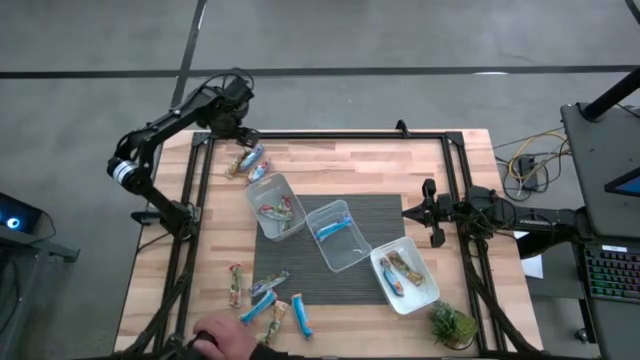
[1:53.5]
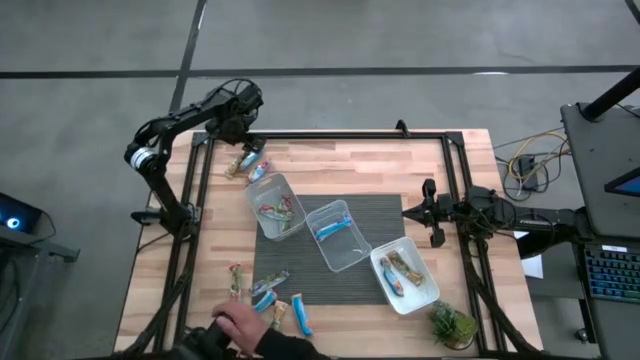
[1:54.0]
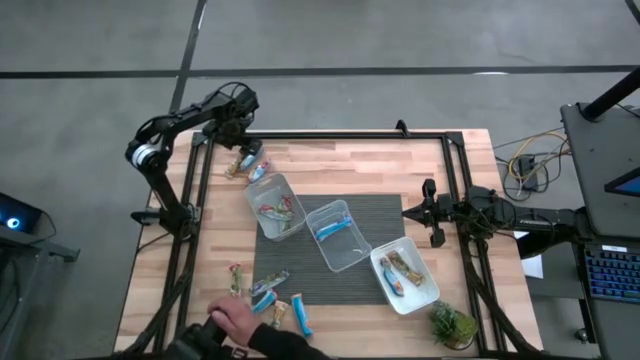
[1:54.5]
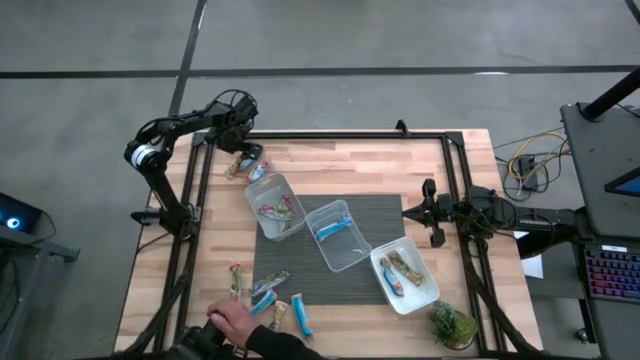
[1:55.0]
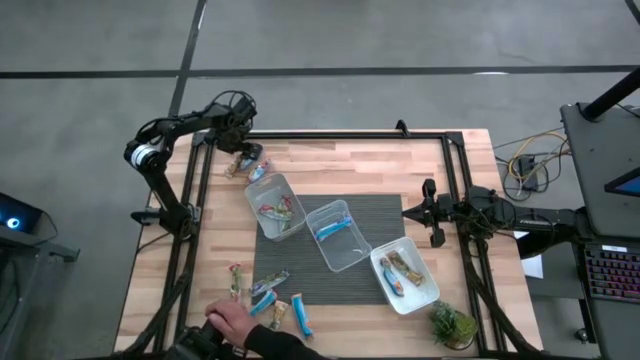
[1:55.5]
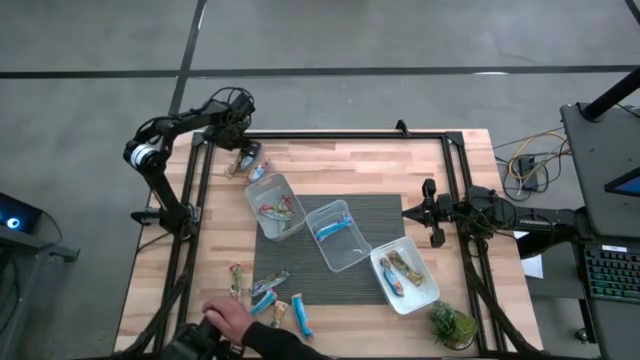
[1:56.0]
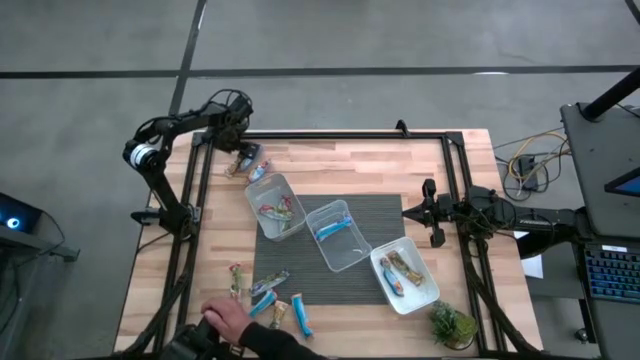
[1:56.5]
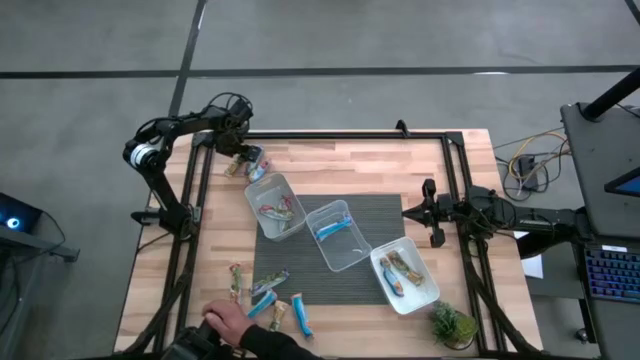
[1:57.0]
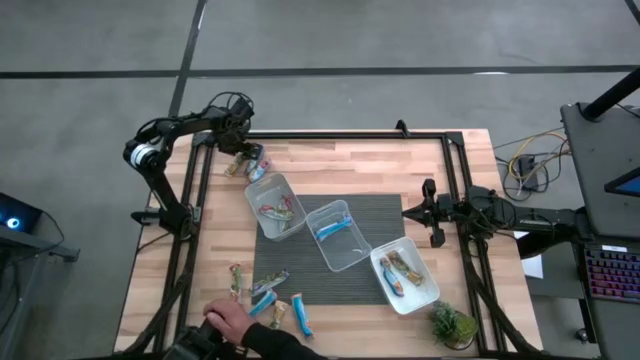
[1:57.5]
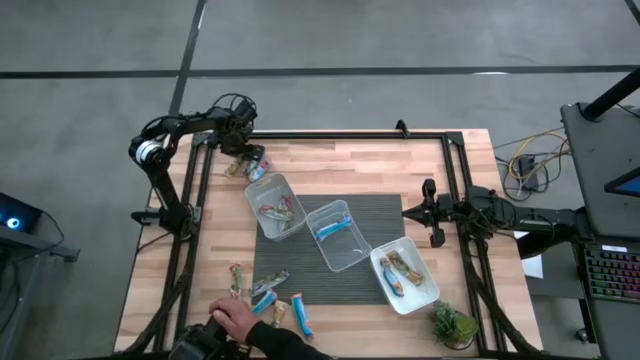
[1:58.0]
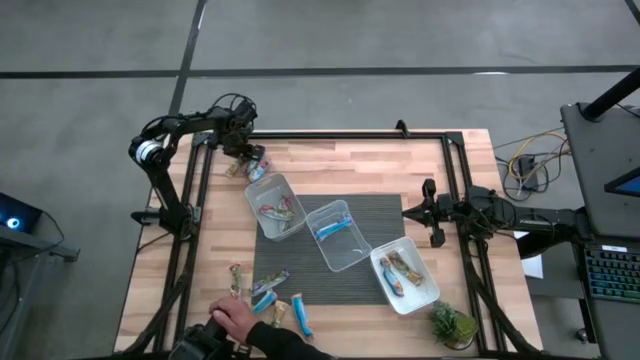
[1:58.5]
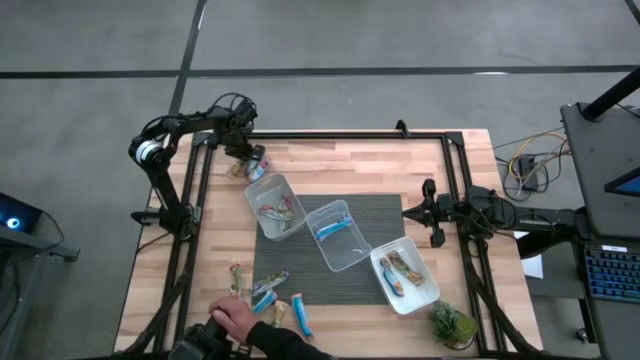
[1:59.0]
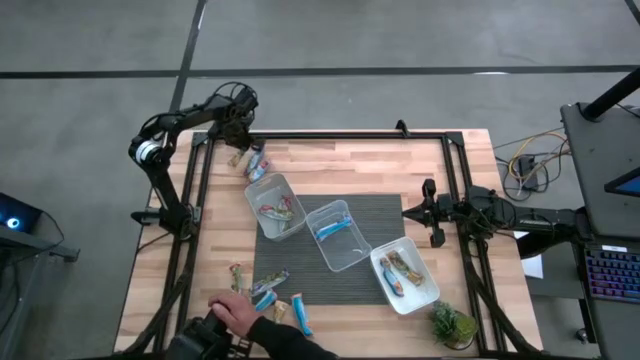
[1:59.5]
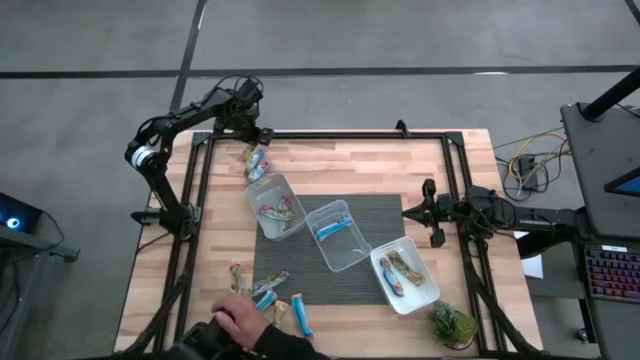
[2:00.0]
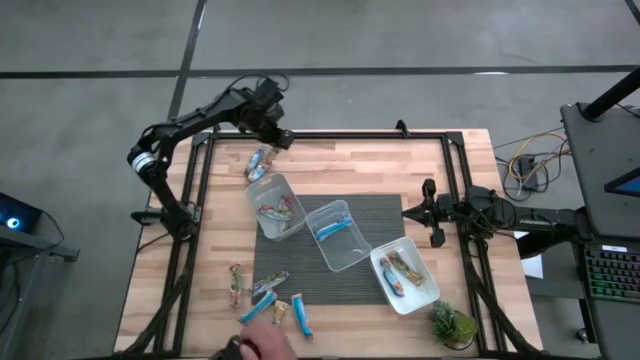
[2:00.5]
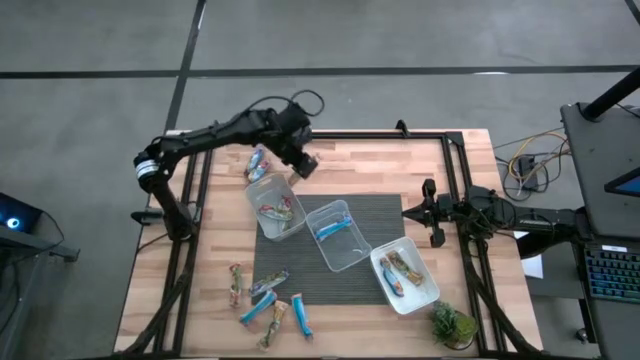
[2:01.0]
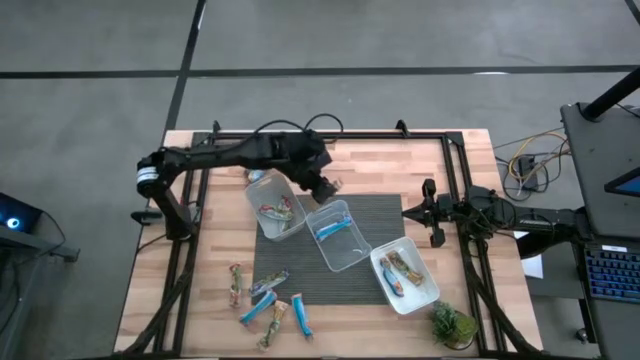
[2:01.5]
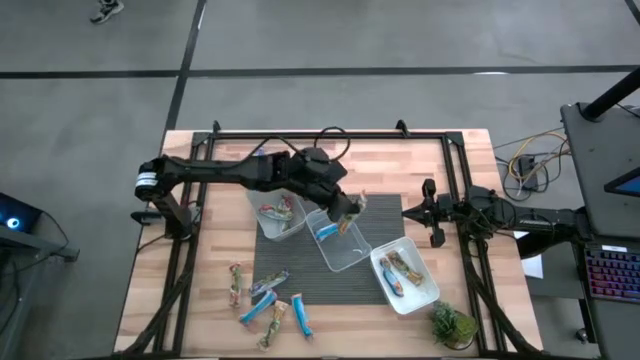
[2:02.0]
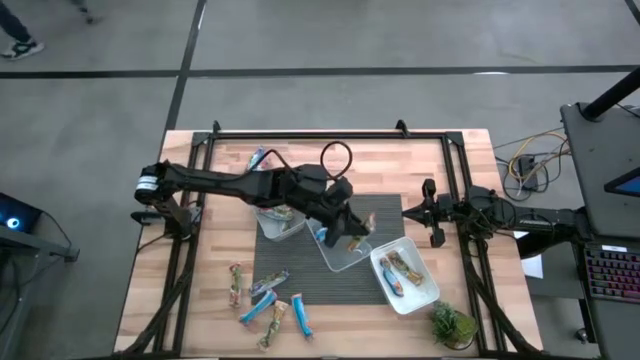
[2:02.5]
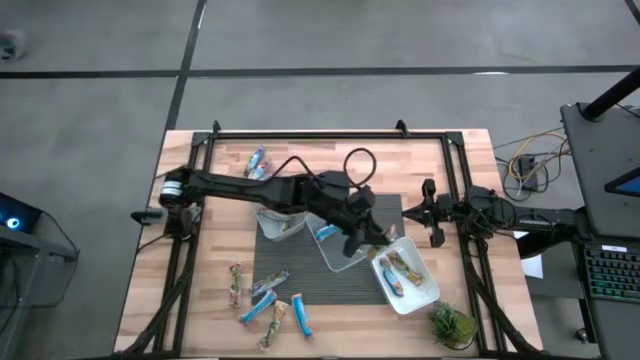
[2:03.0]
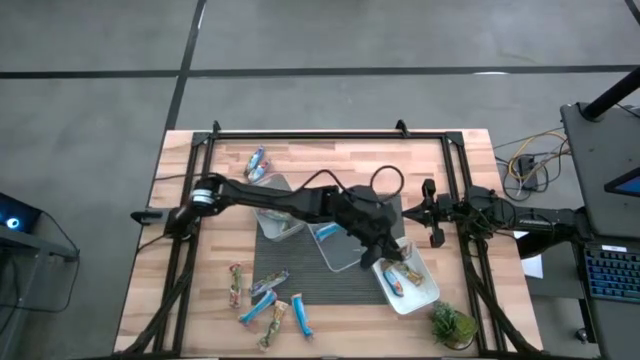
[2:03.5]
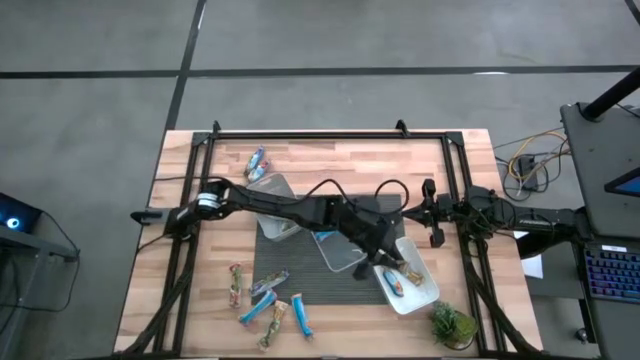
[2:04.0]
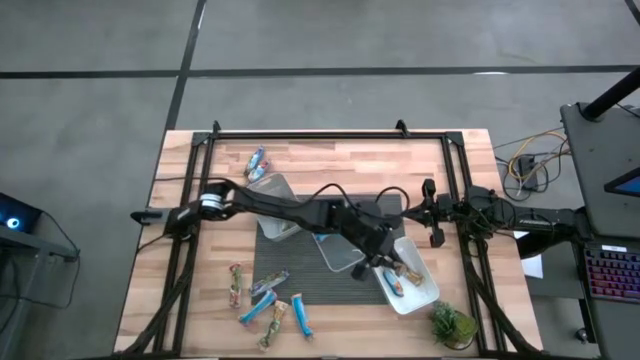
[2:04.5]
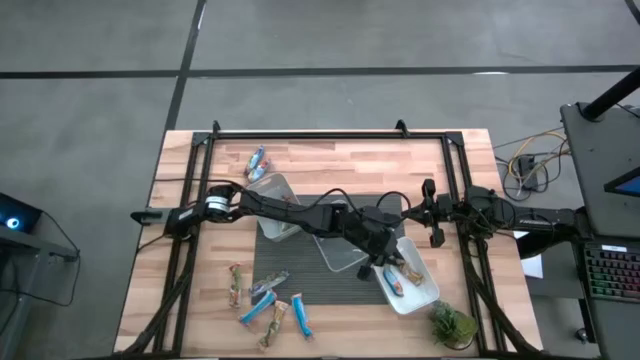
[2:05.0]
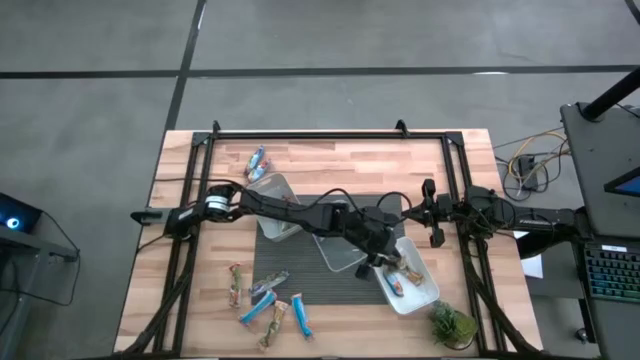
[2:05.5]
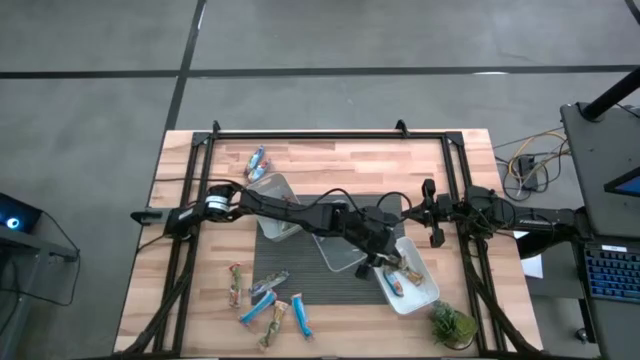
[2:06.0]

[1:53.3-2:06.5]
Task: Pick and place Granola Bars by type
Put the yellow granola bar into the white bin

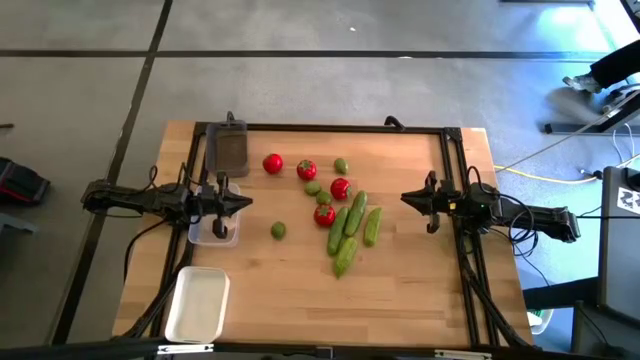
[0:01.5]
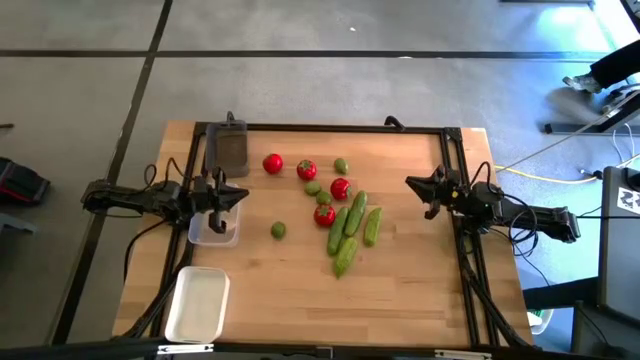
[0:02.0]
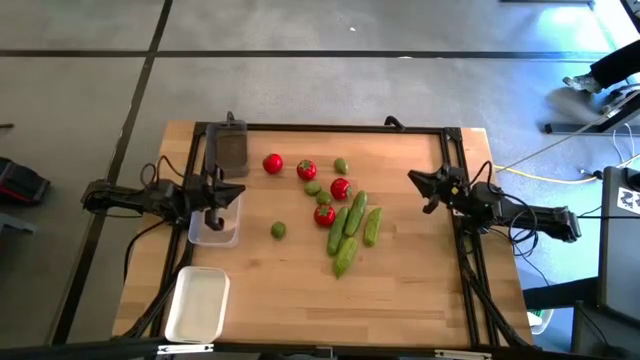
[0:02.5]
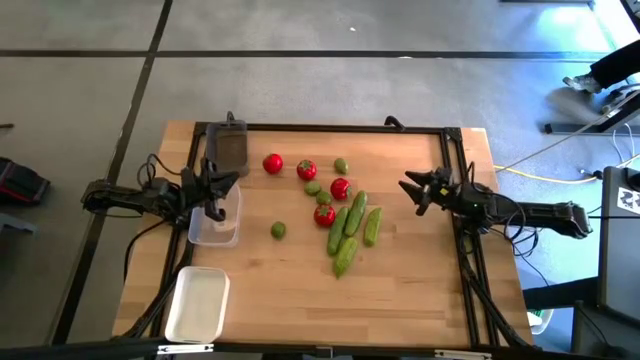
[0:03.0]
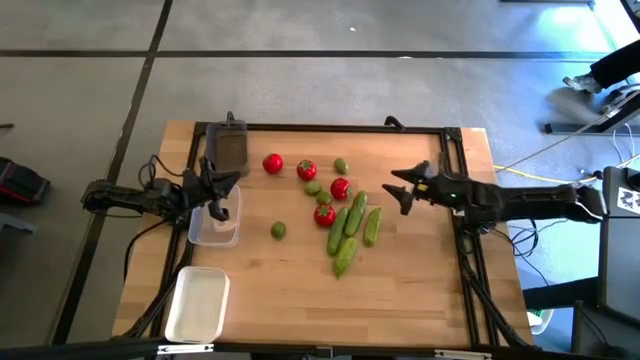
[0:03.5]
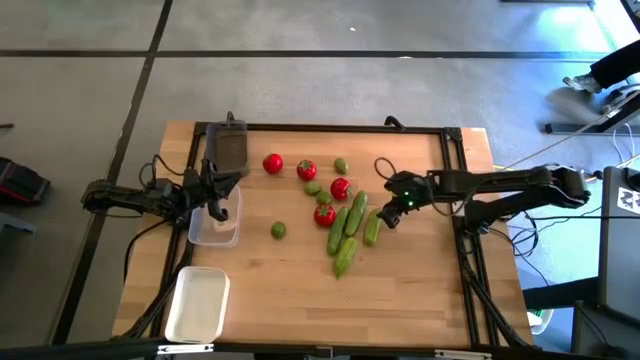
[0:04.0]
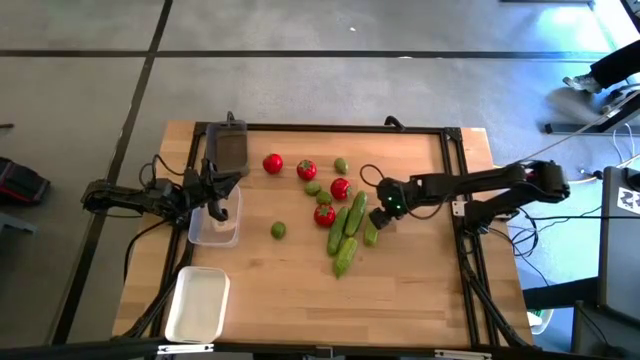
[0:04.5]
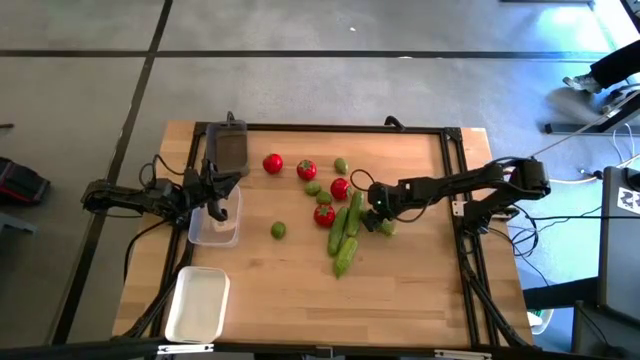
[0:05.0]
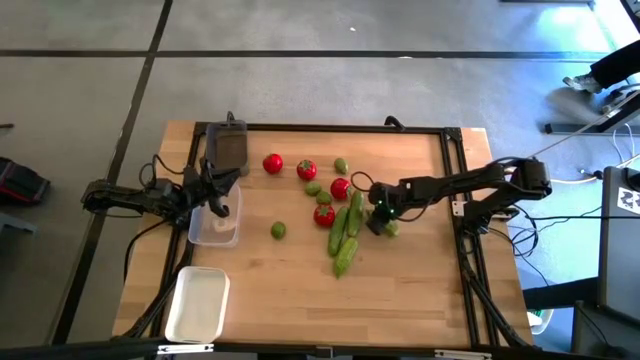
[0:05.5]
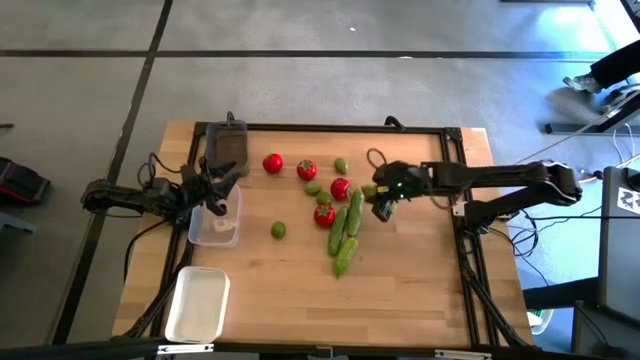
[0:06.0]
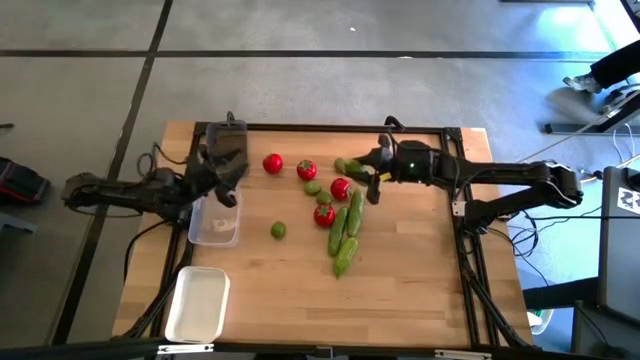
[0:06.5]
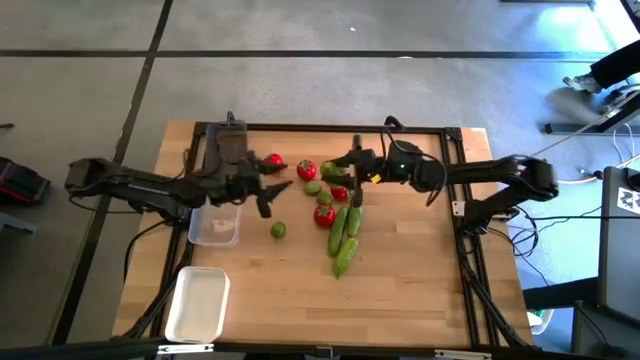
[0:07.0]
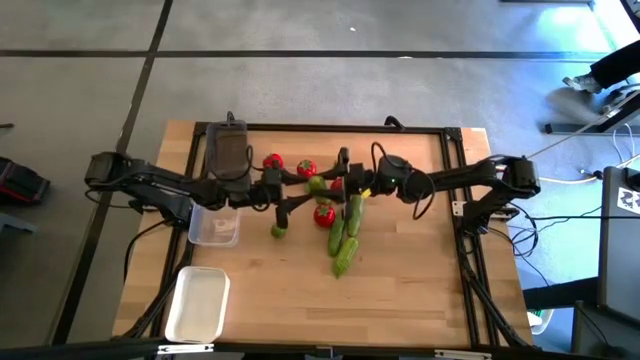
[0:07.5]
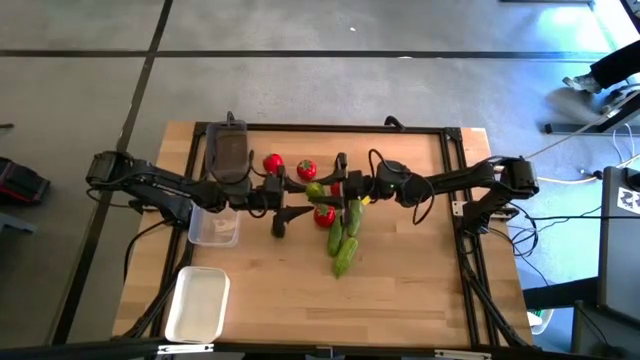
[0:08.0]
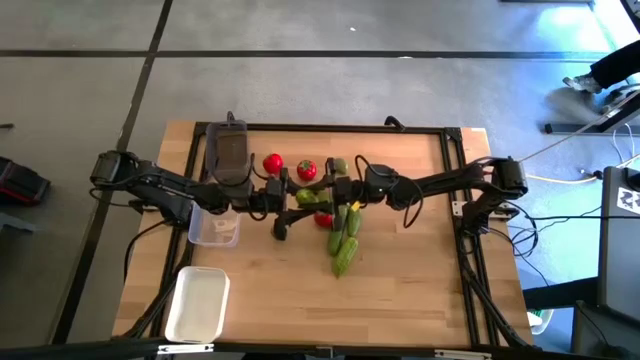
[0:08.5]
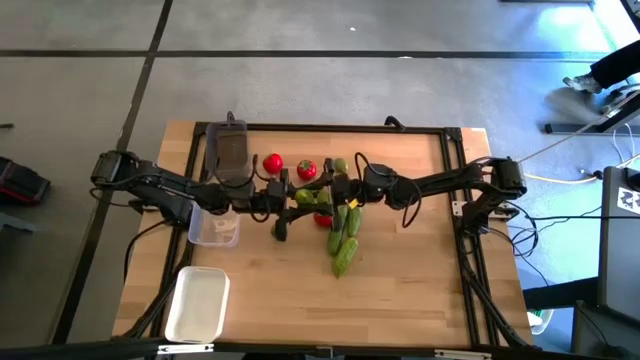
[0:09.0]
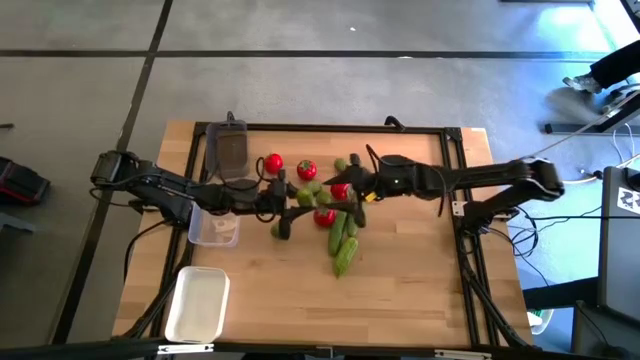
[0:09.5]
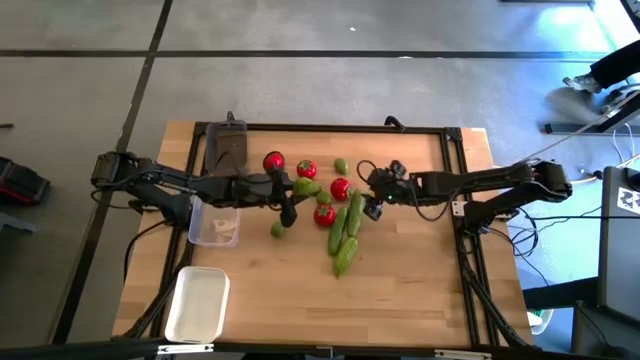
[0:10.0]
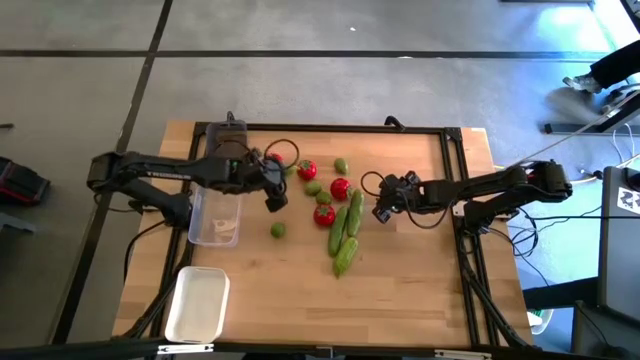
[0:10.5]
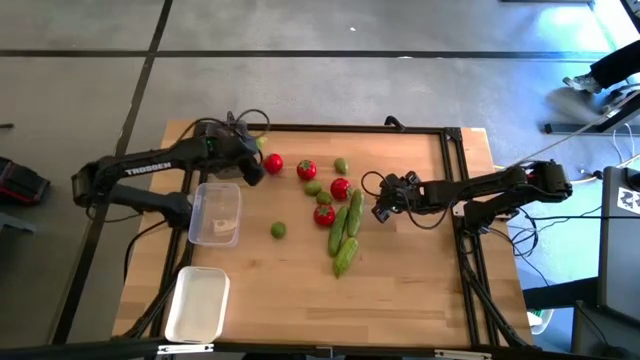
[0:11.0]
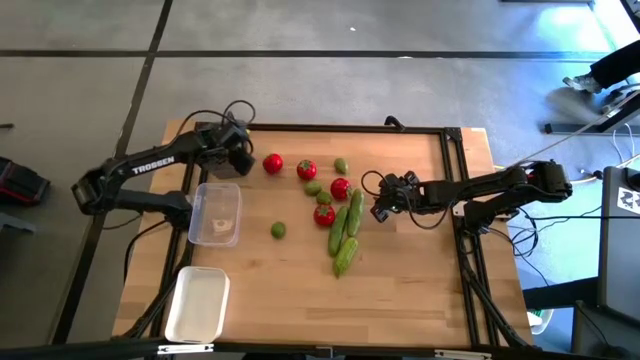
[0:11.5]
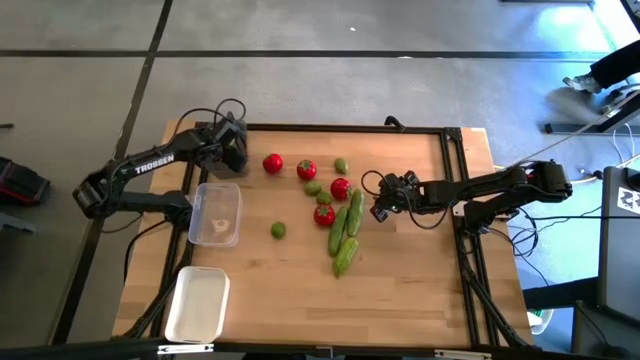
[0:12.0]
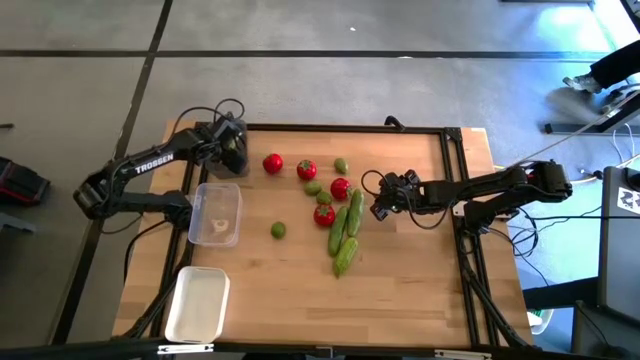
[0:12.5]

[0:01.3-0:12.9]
Task: Sort produce into baskets
Put the cucumber into the black bin
